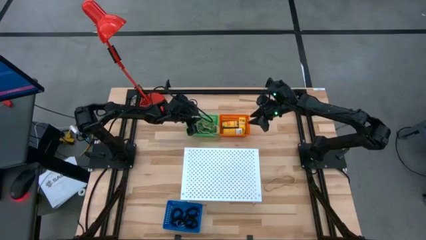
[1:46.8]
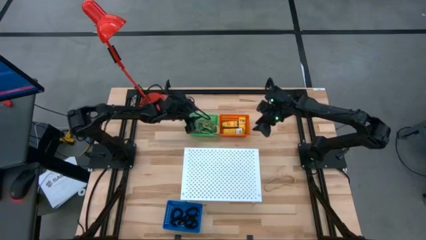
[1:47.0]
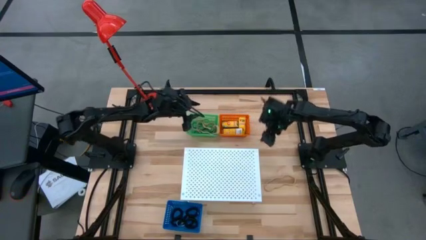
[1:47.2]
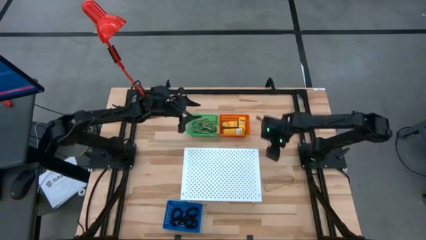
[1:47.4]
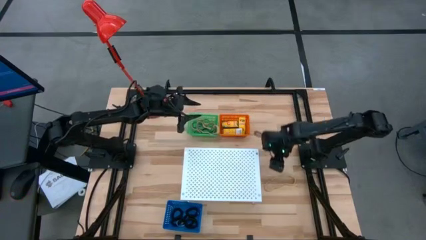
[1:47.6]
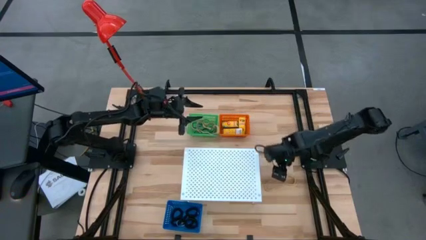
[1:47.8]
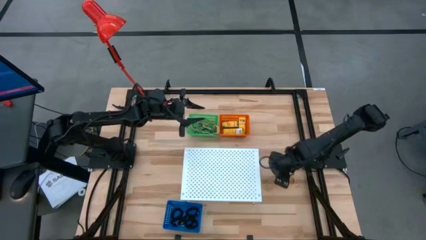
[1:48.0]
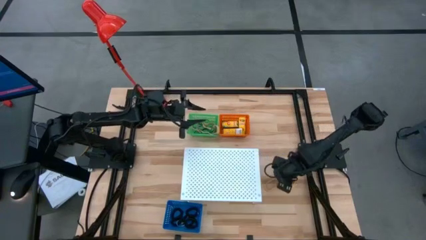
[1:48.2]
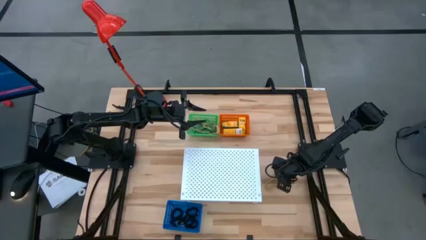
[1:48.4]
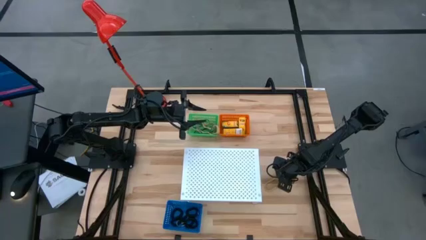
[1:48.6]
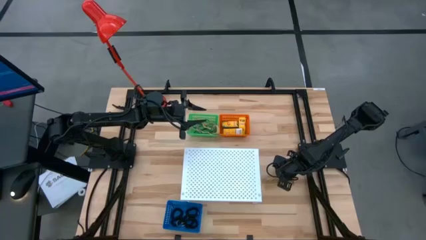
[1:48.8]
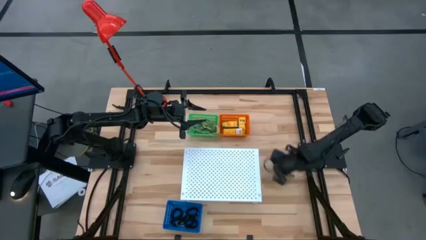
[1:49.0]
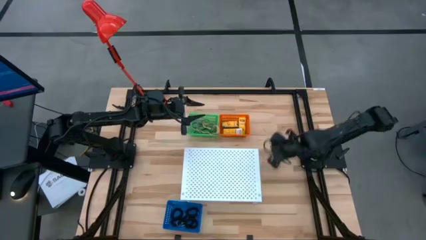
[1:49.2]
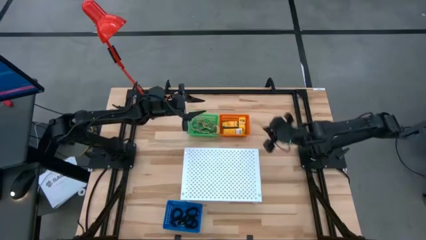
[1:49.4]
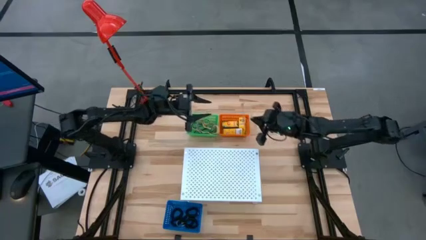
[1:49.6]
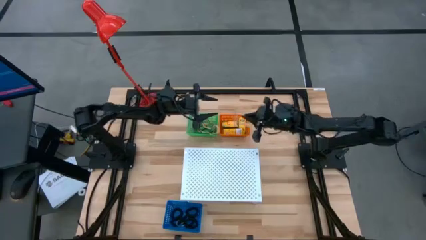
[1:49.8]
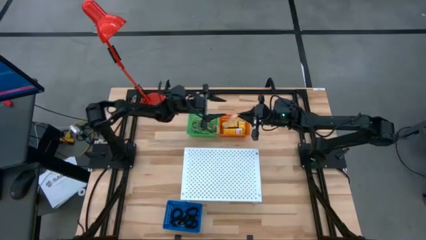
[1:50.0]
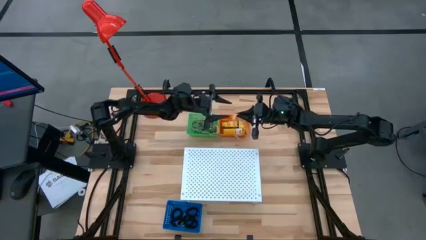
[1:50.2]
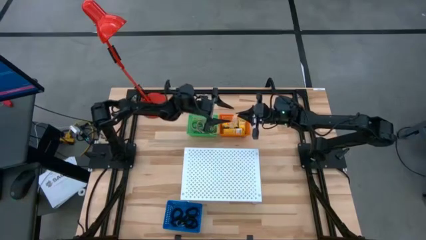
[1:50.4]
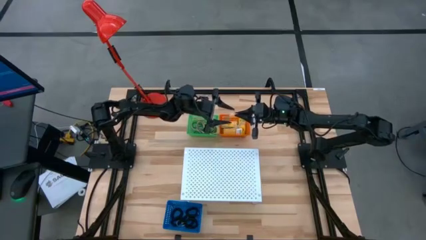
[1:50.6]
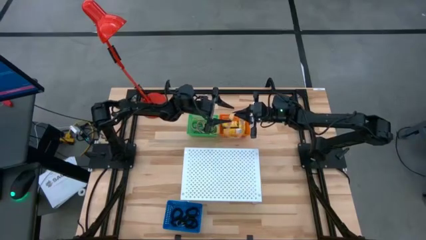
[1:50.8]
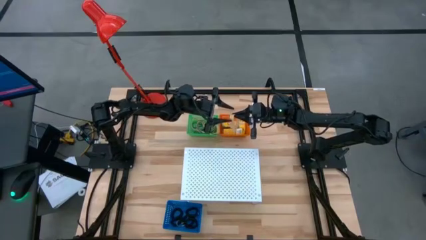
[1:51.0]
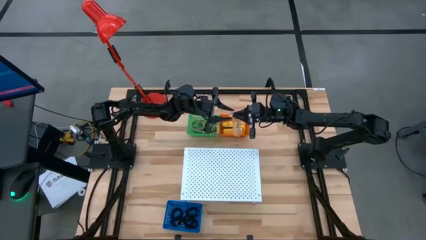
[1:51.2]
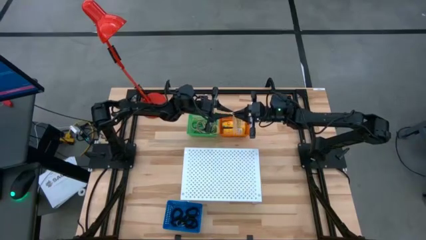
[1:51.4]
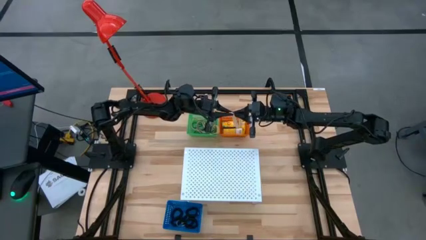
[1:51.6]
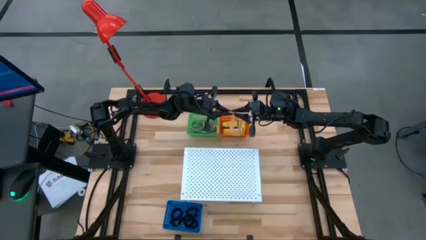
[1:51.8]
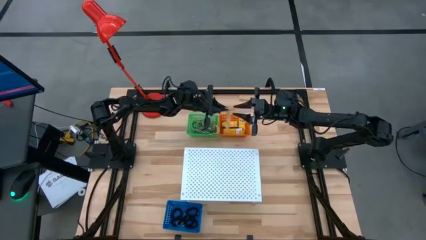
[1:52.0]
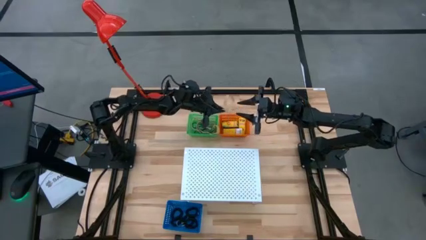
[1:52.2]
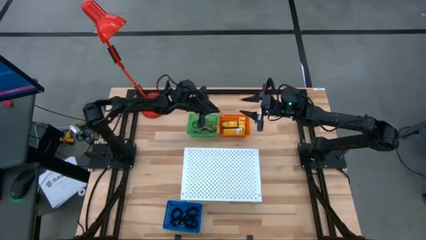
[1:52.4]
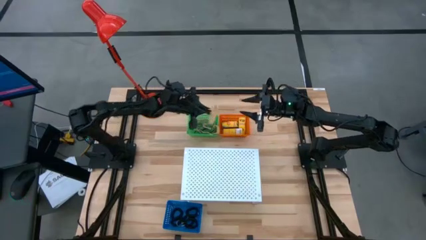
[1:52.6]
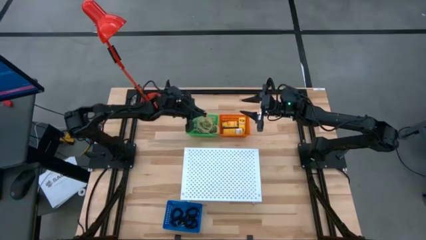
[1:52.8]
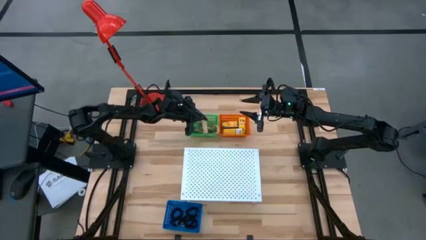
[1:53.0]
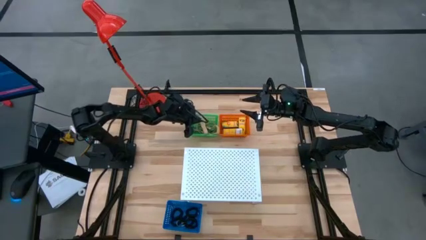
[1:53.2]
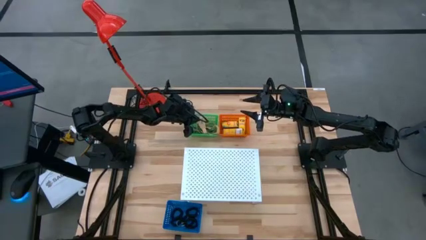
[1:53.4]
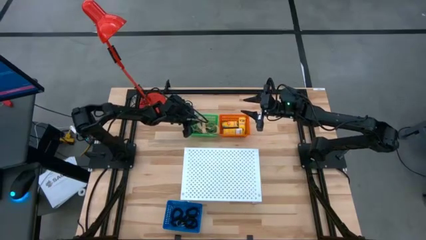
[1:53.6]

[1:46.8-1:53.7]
Task: Pick & Place Office Desk Supplies
Put the brown rubber band into the green bin

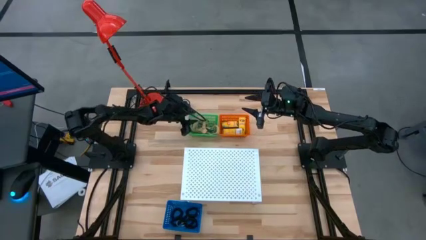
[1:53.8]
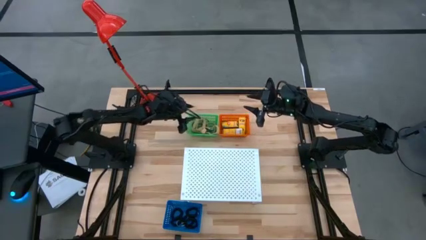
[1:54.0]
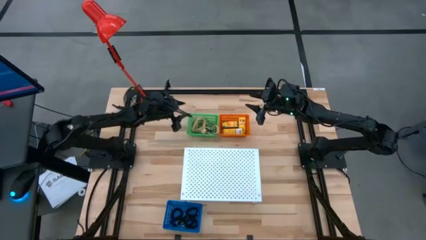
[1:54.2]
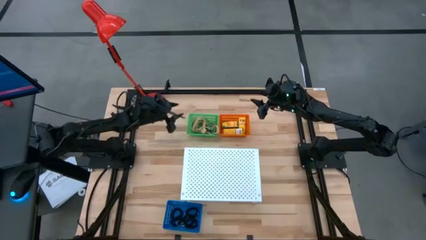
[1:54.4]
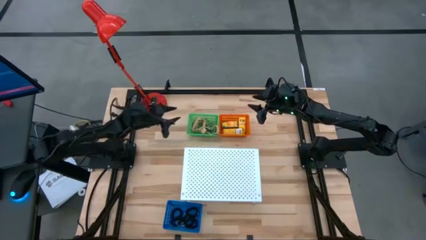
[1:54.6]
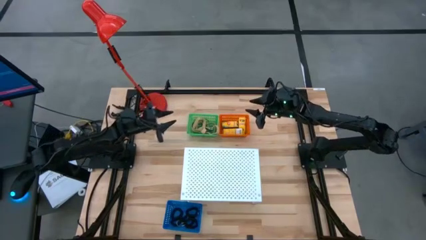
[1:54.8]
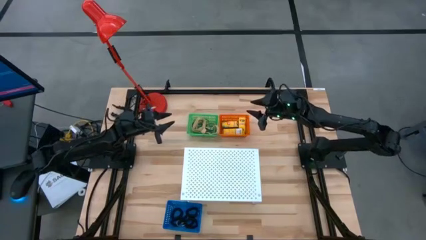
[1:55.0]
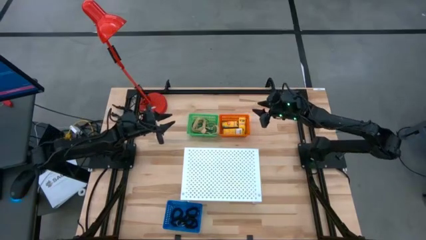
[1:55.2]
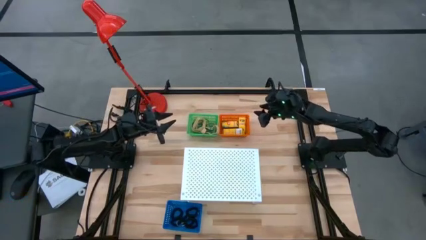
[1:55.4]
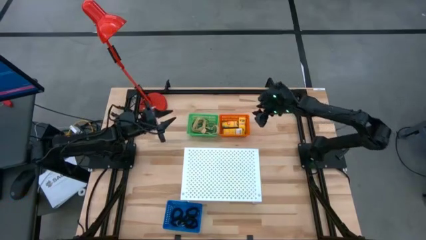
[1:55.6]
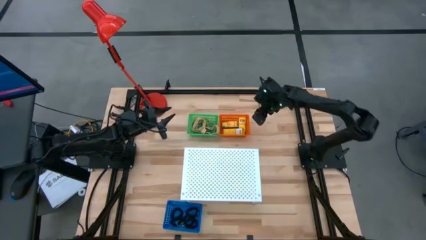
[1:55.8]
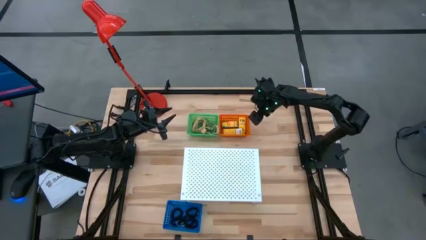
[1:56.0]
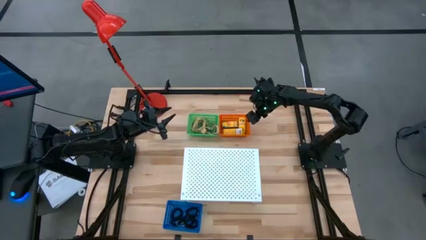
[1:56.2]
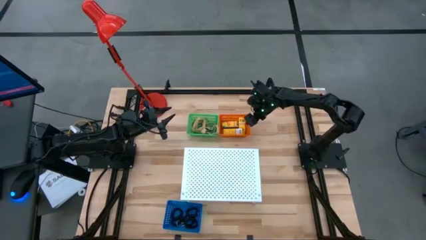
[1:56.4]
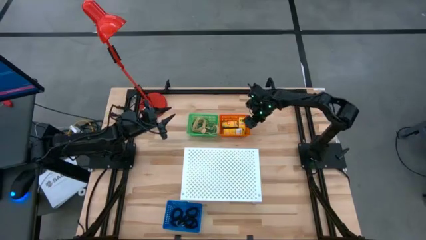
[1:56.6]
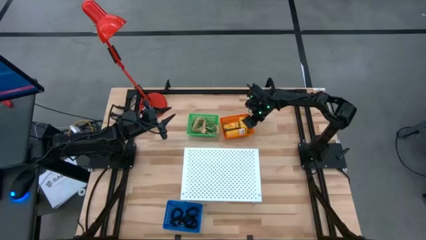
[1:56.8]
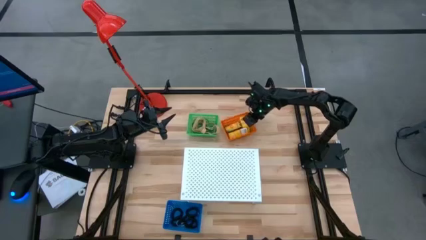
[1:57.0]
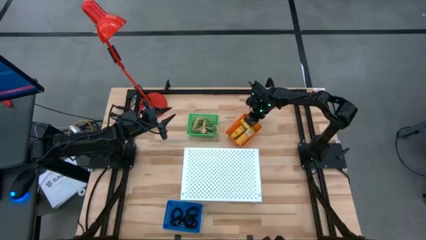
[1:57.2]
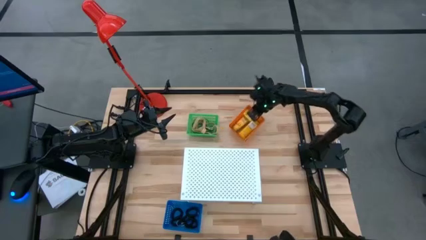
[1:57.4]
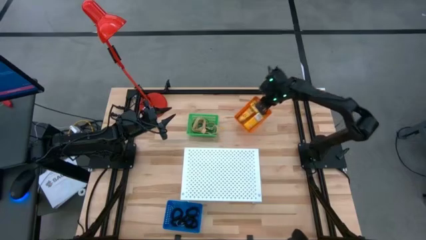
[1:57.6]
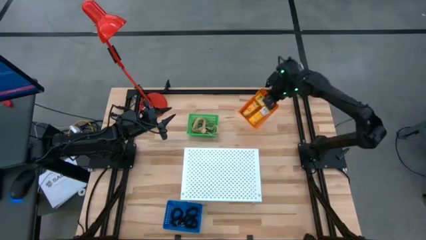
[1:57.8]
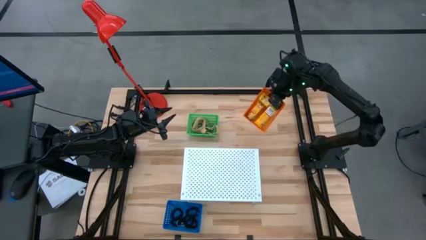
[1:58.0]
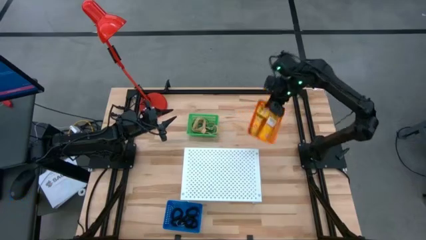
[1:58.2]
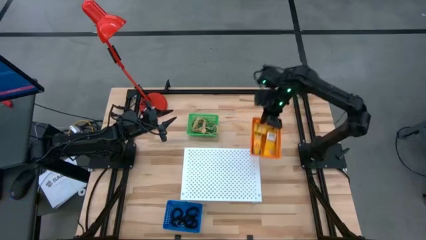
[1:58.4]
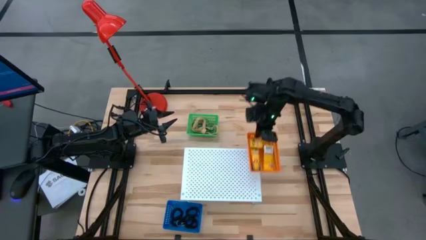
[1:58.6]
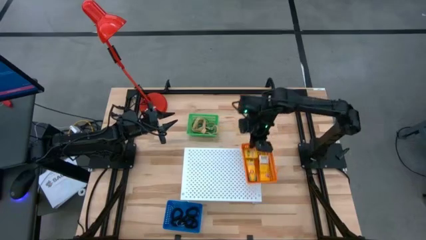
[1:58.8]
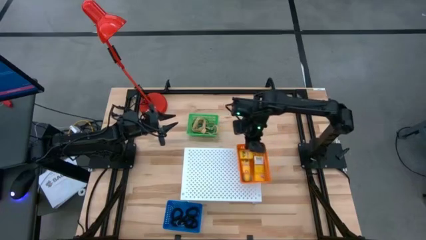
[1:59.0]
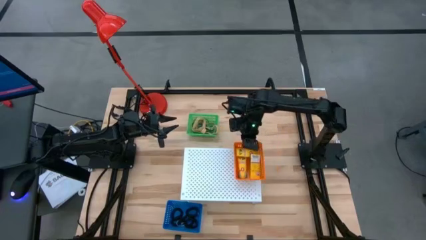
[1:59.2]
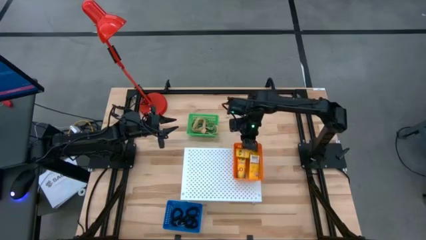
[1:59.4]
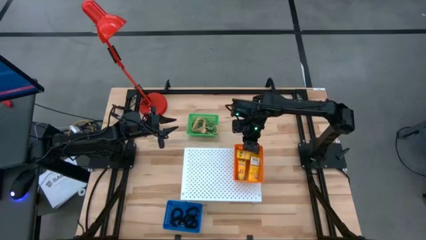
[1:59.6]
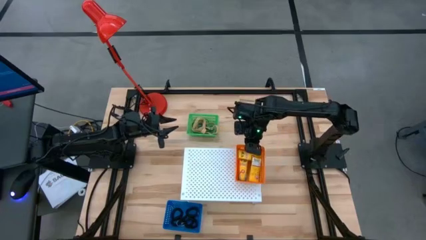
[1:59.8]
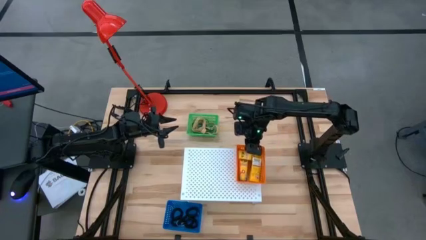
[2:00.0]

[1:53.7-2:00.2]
Put the orange bin on the shelf
